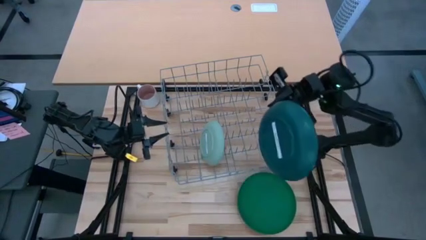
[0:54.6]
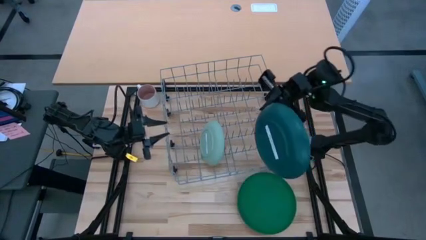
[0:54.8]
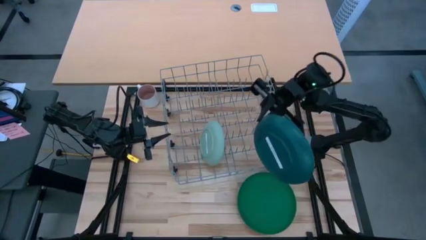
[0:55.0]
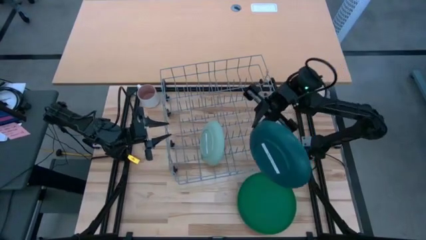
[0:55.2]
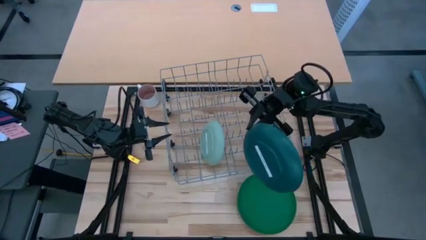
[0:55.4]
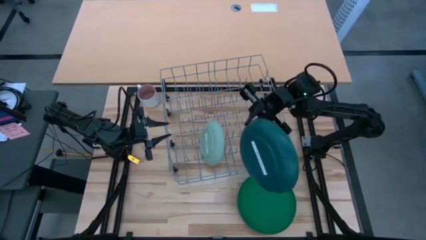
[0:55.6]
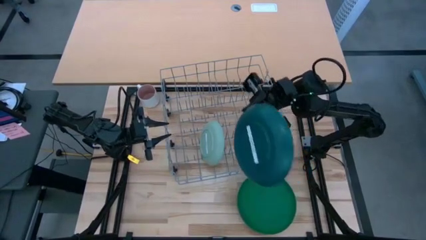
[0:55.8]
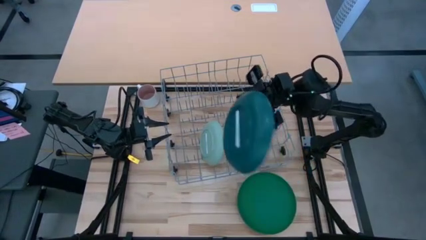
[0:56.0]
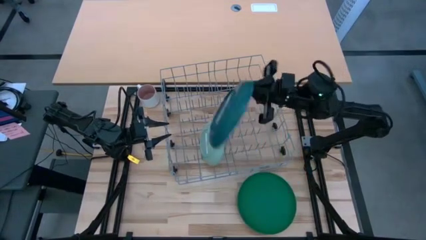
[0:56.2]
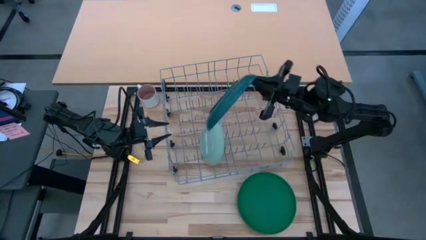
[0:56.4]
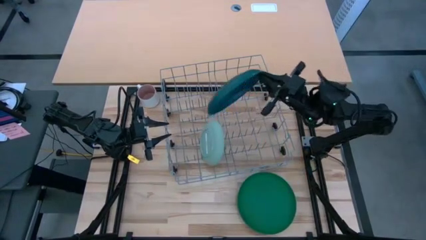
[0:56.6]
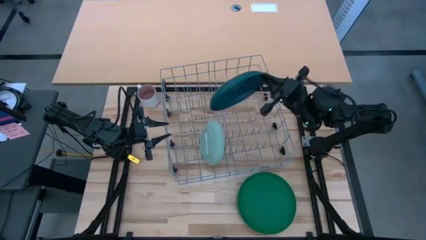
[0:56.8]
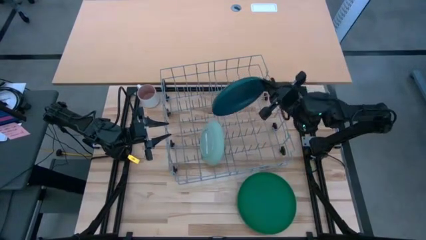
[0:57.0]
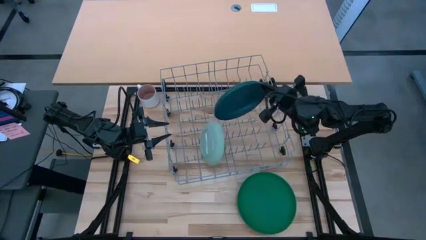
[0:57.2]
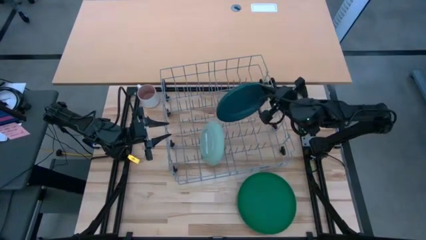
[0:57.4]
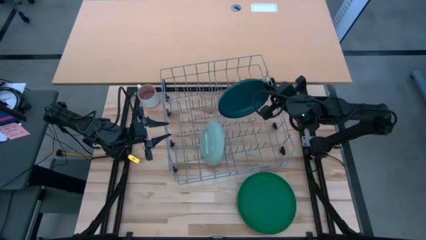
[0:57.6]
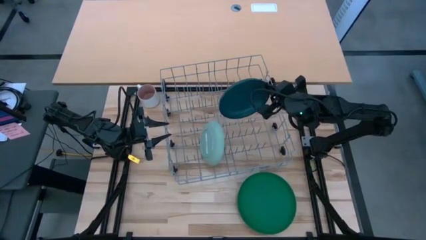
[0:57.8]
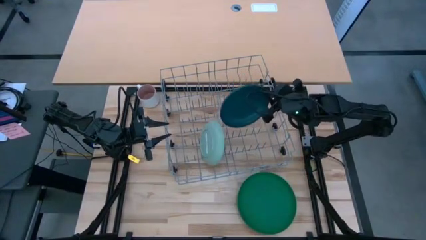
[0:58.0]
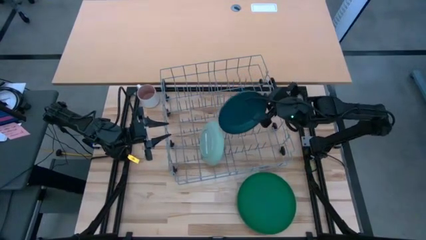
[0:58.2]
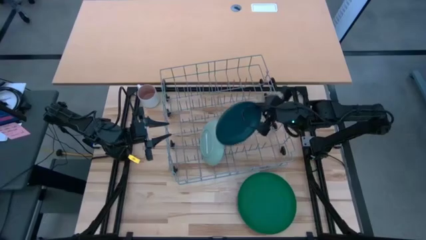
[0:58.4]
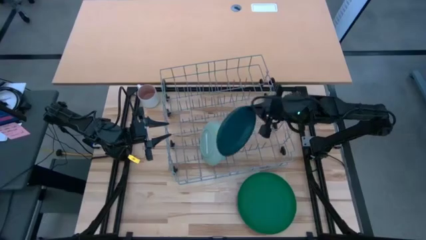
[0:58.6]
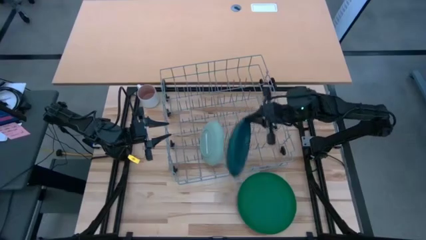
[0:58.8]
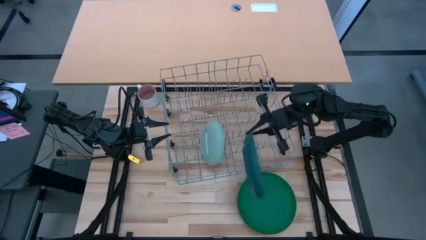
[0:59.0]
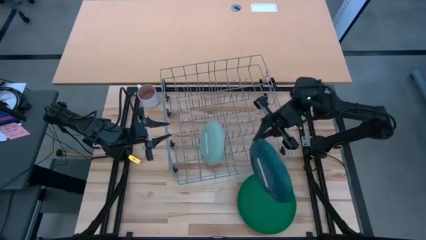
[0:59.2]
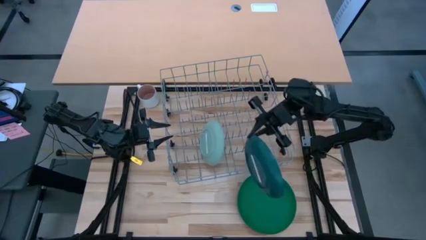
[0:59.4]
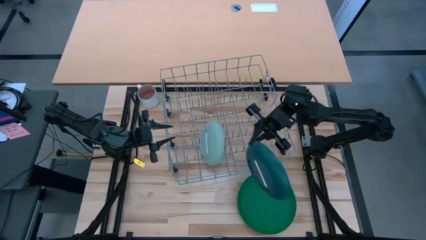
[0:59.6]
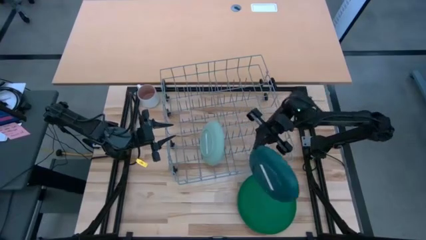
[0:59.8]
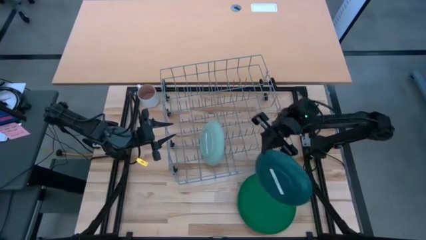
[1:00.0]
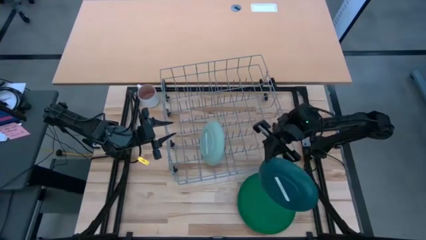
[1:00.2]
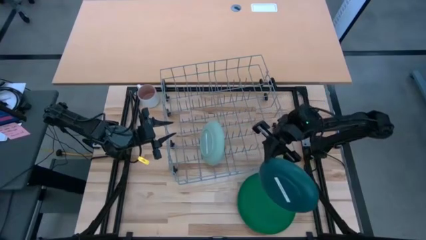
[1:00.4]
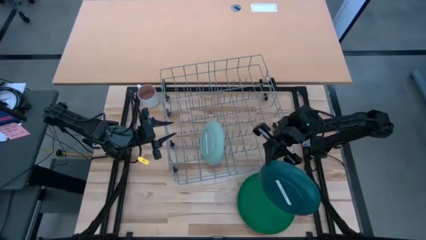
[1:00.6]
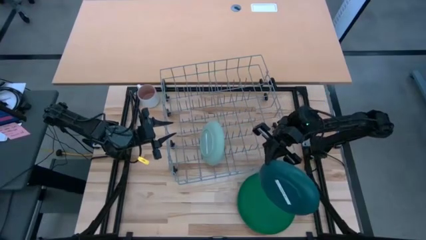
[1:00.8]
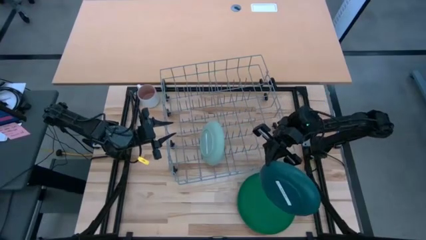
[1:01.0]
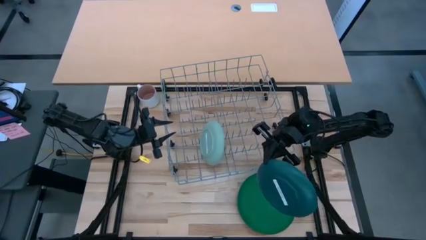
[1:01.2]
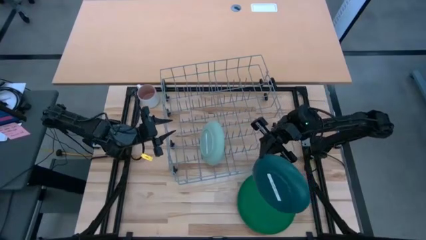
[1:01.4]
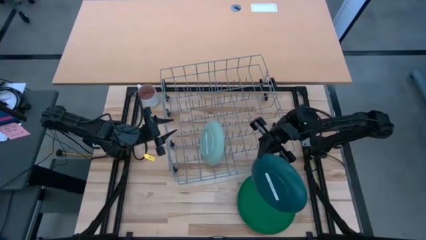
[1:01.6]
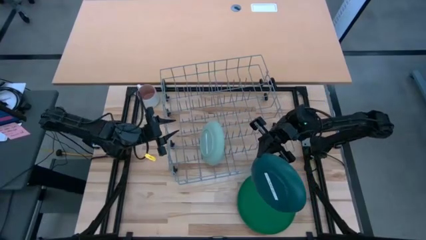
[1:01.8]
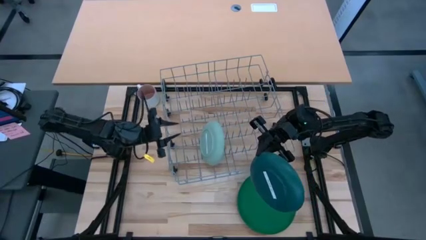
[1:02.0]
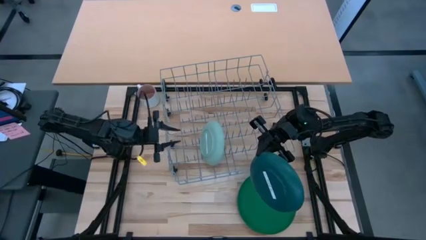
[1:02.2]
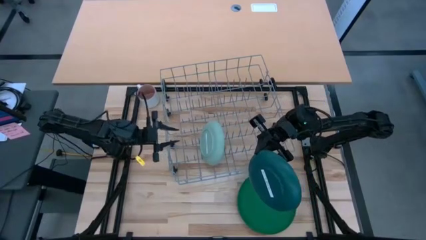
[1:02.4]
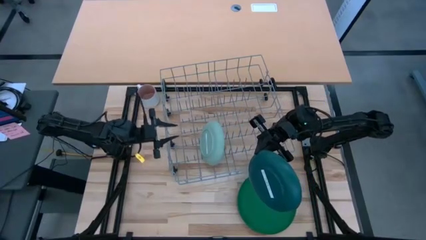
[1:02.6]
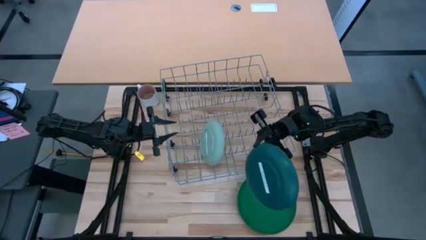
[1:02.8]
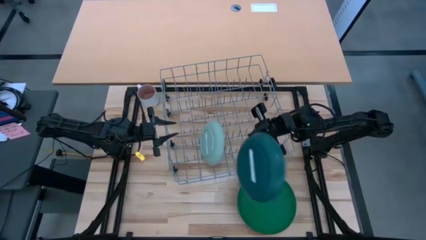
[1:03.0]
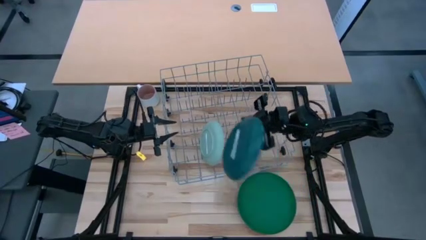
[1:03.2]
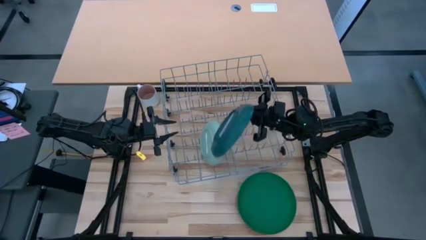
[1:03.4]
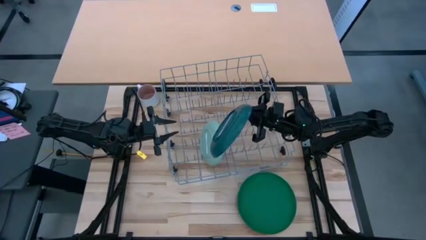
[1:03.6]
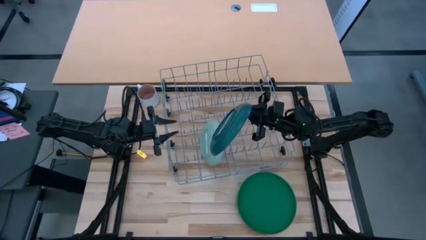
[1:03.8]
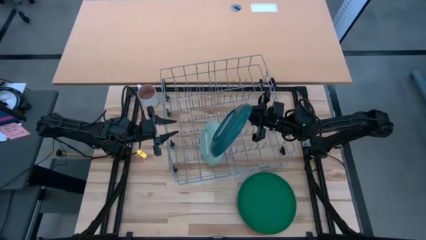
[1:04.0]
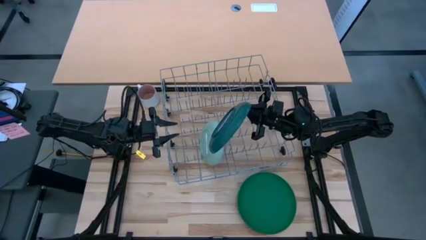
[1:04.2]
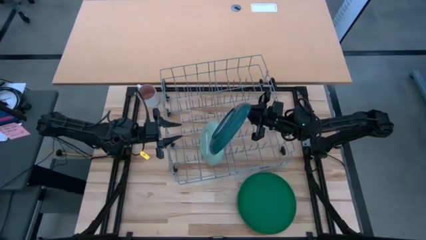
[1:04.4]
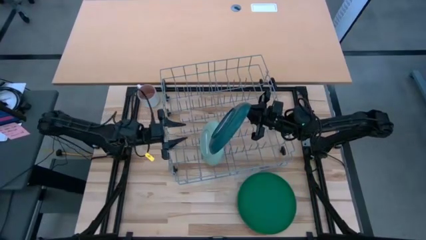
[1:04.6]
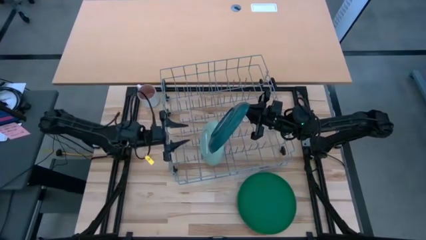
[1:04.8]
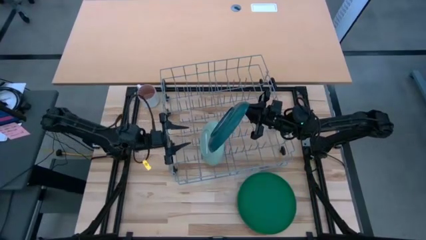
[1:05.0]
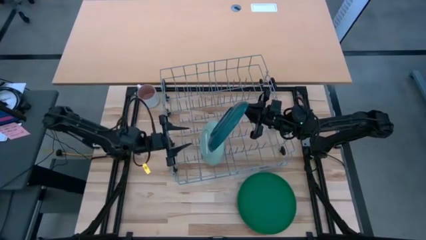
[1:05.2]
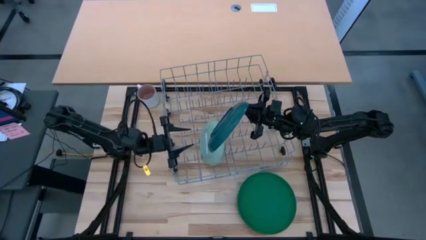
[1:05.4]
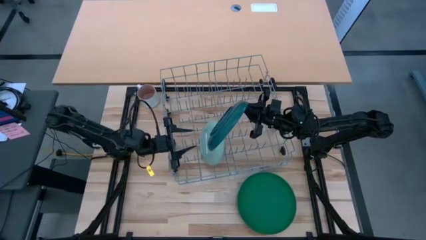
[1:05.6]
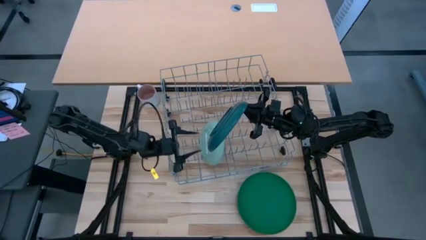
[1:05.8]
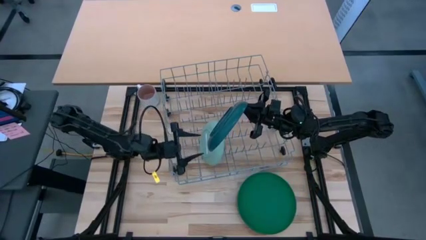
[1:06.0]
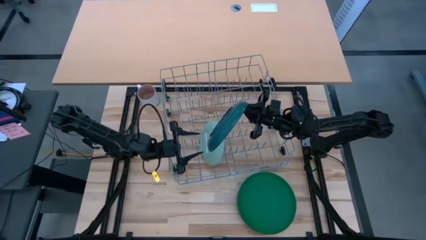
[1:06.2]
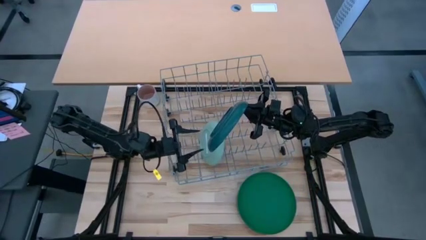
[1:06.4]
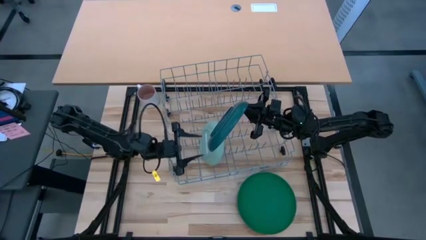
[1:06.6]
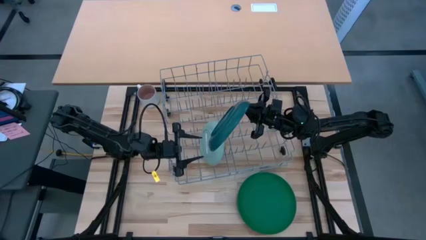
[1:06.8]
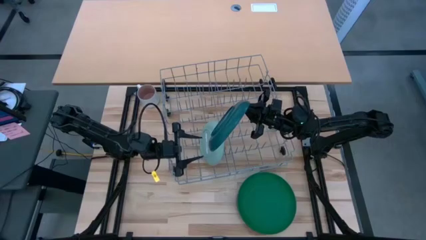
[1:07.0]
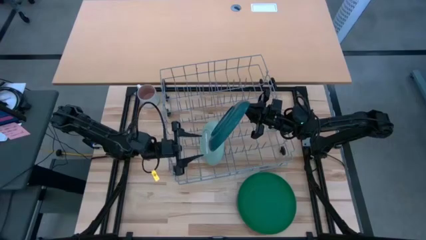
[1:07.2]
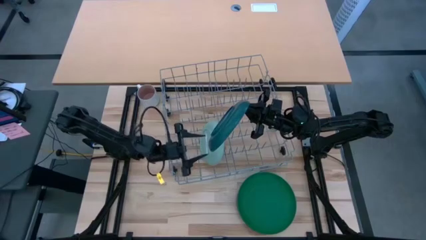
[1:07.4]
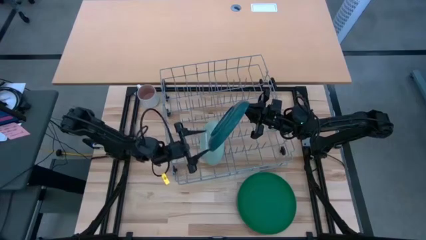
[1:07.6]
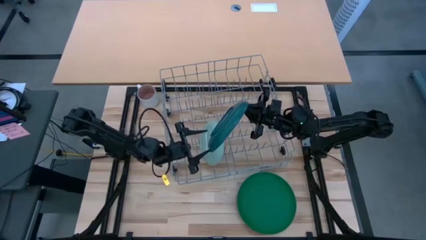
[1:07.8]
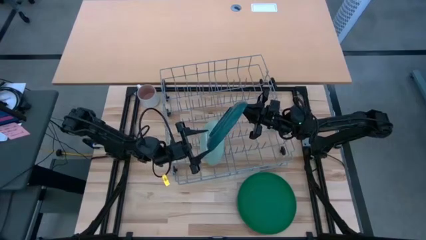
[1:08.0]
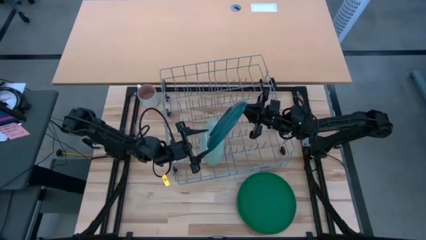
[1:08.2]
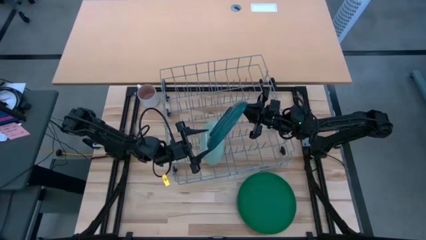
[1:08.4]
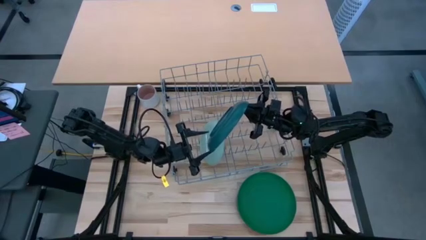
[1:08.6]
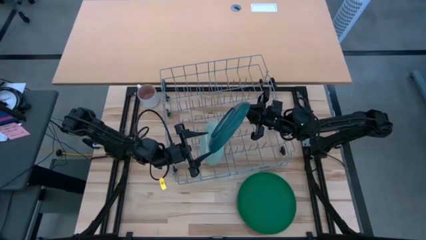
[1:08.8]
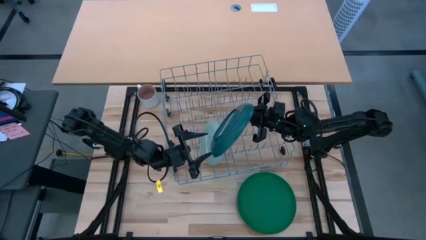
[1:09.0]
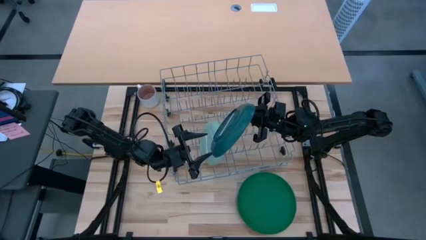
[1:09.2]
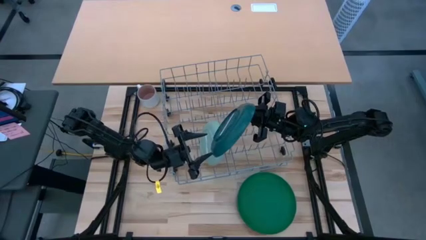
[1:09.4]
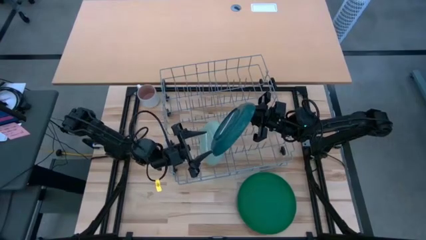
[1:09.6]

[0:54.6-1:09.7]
Task: Sort dishes
Put the dark blue plate in the dish rack
